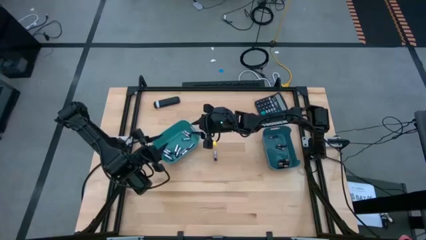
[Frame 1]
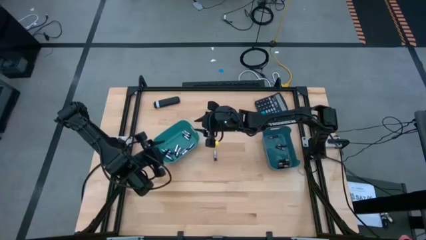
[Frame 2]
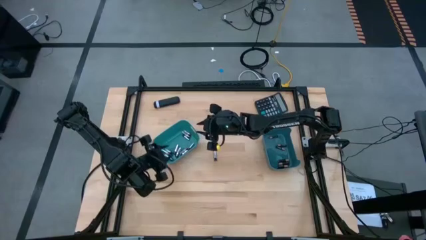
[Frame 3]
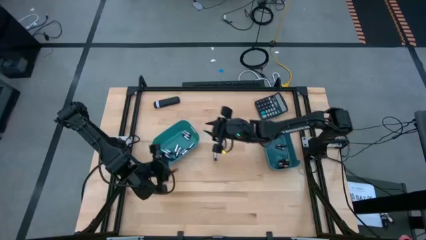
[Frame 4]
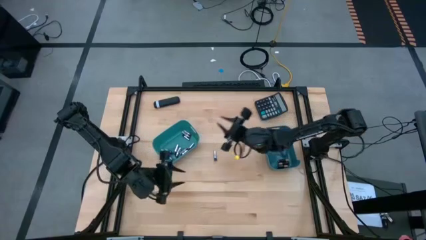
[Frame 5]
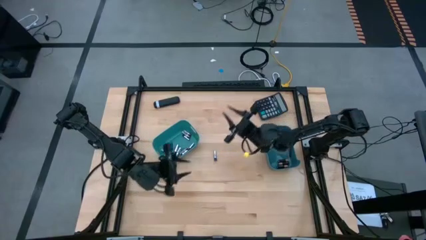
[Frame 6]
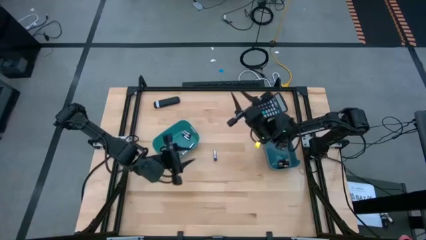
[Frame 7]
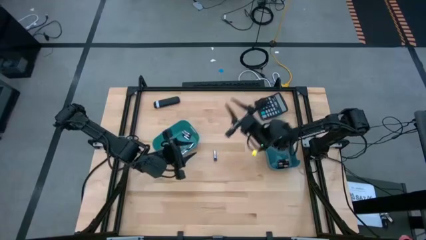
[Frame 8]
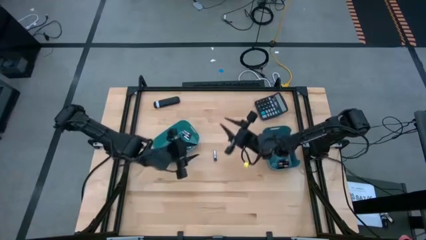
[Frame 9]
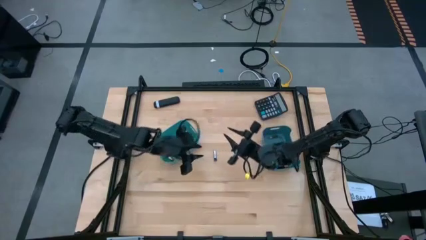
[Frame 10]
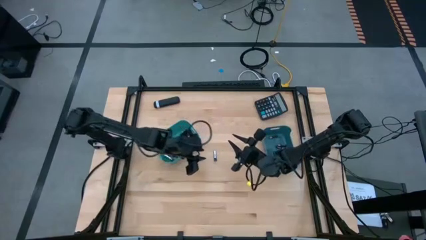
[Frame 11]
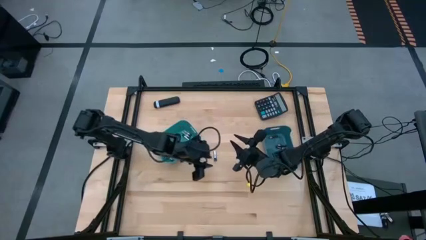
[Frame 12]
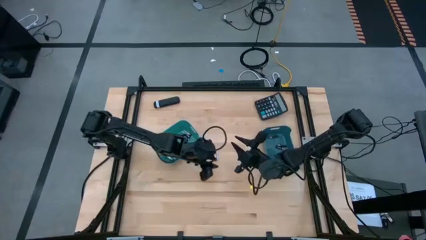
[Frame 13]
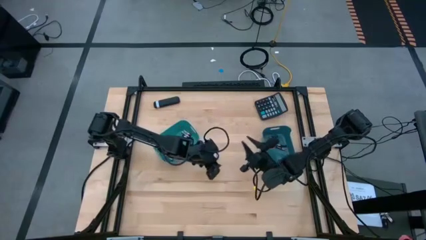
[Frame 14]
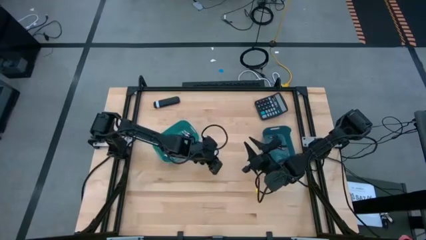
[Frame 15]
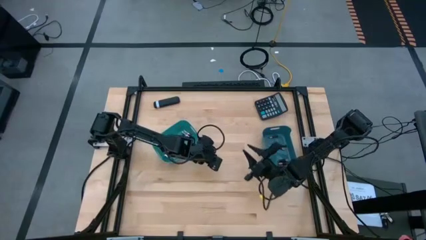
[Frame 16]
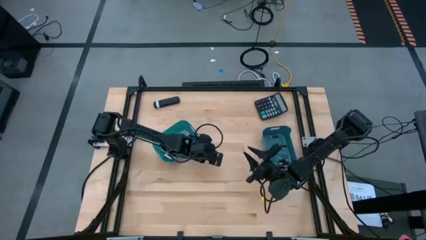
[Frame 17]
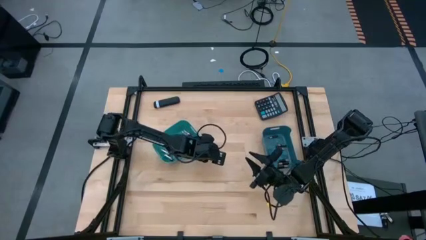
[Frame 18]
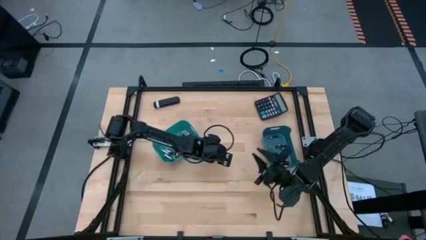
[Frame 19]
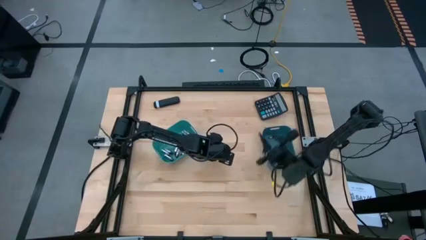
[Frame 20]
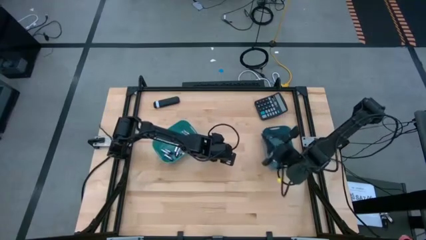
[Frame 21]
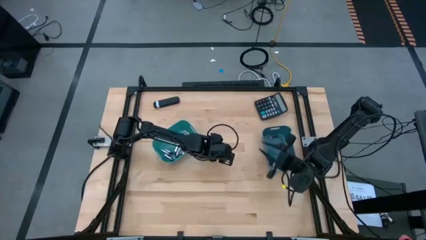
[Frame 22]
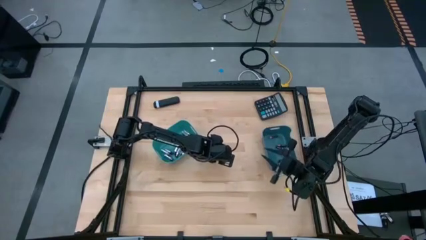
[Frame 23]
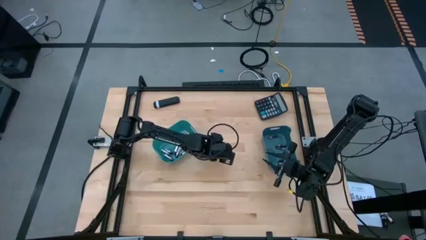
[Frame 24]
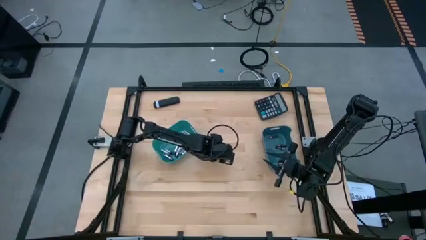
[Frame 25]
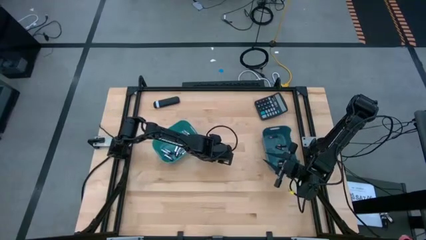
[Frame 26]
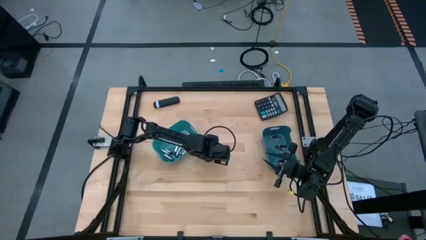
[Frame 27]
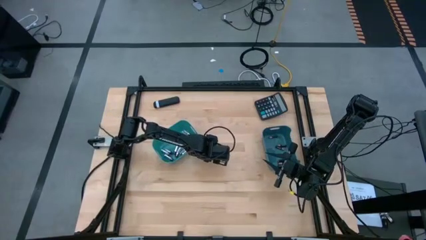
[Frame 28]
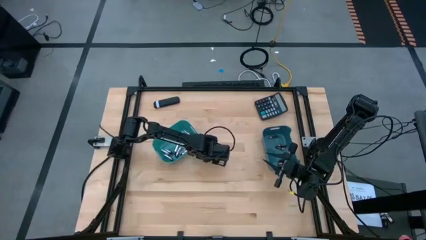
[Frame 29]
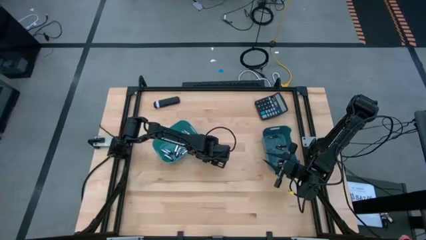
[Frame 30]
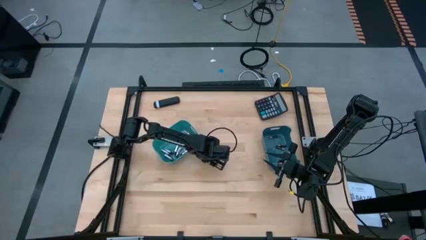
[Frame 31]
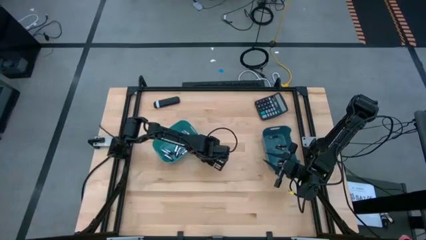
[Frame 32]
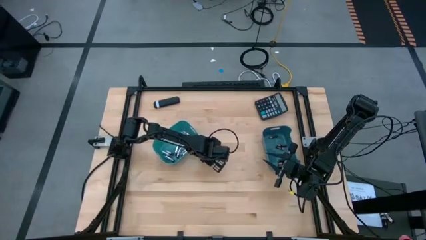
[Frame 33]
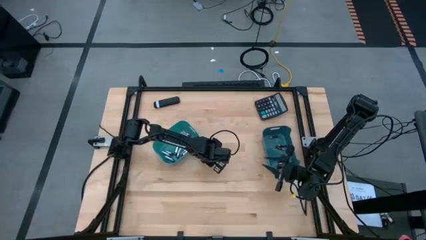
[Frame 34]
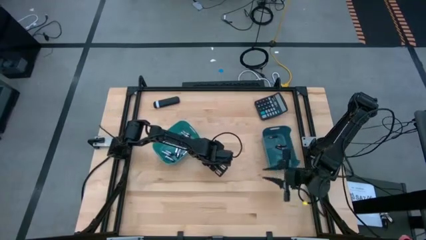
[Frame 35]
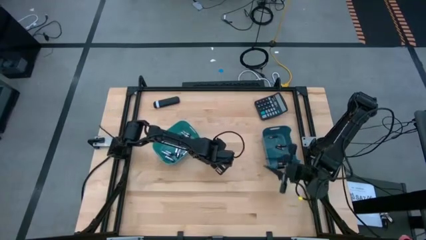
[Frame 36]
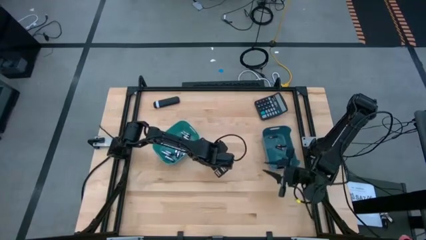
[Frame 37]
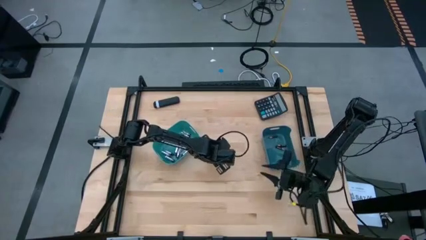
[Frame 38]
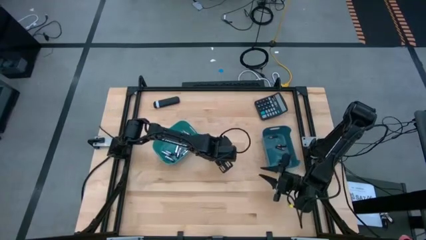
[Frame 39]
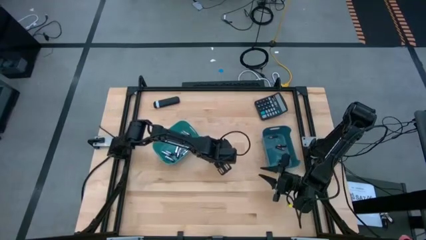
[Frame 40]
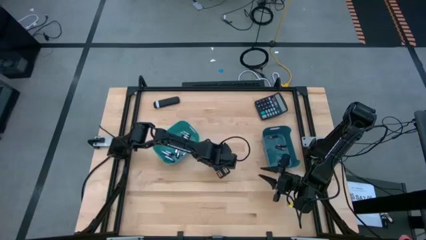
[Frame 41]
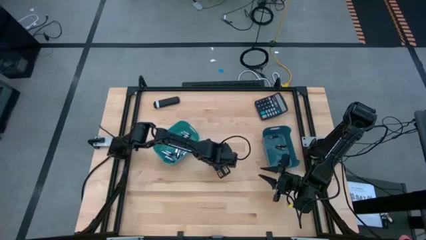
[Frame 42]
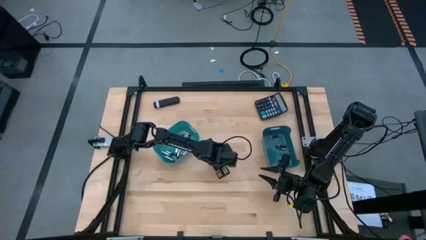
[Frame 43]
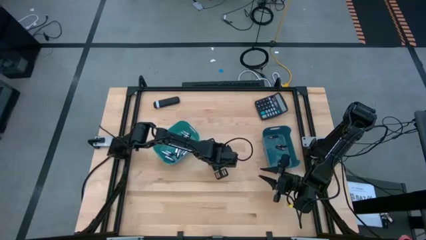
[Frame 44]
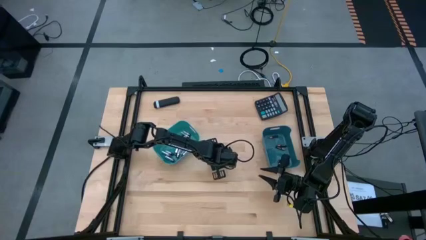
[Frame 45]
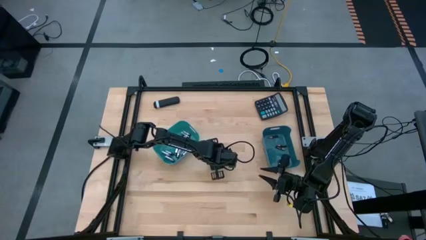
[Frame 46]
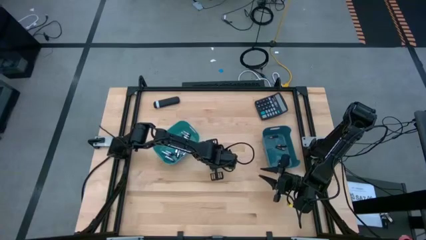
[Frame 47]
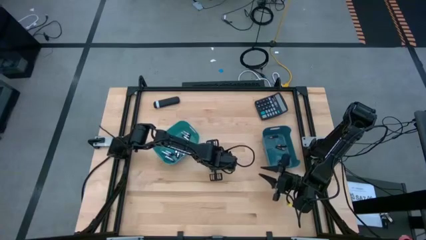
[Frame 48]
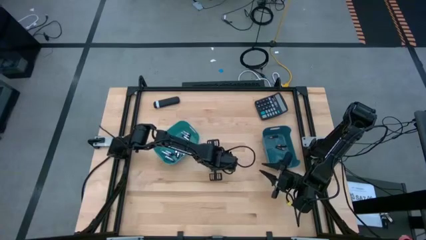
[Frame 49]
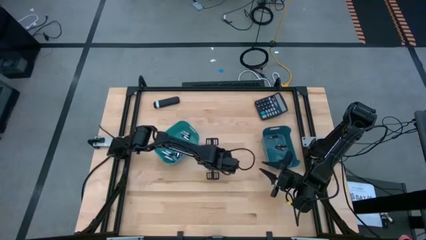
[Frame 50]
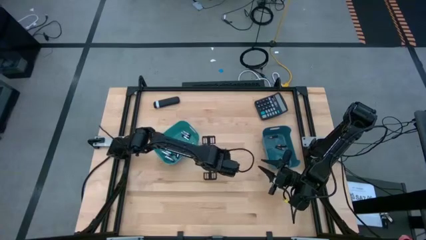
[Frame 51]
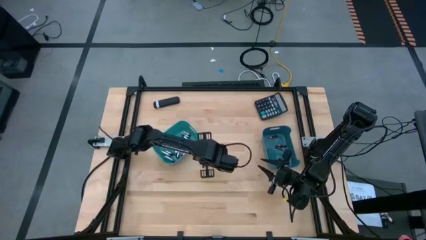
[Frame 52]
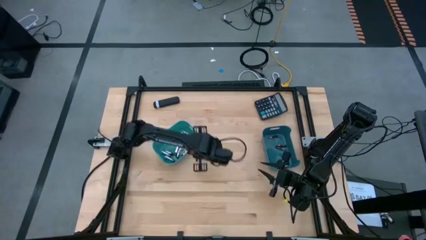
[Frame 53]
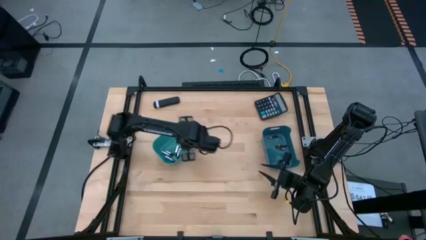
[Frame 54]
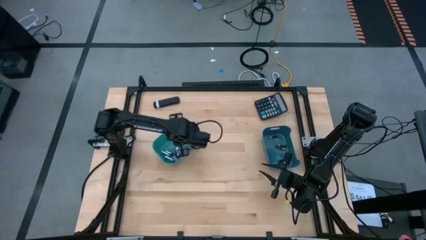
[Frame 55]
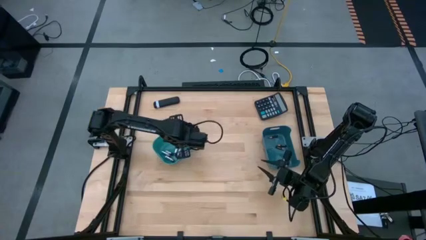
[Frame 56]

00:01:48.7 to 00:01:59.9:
Task: Sort batteries
Put the white battery into the green bin
